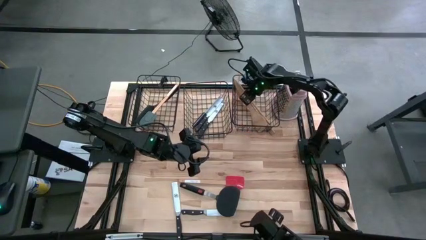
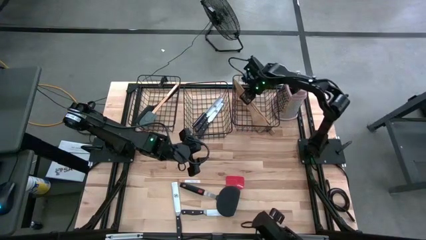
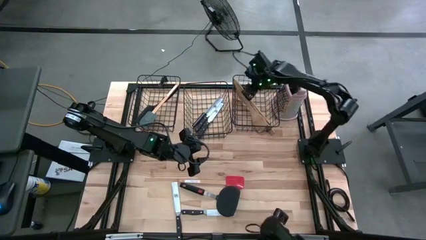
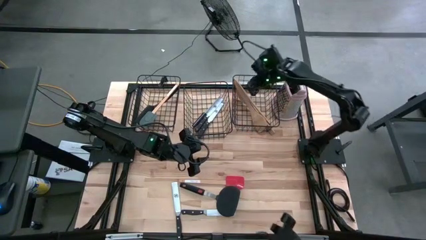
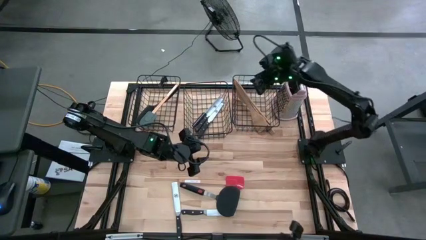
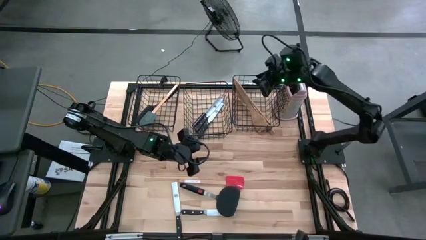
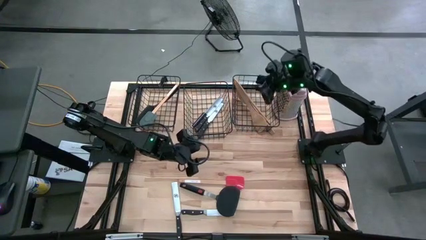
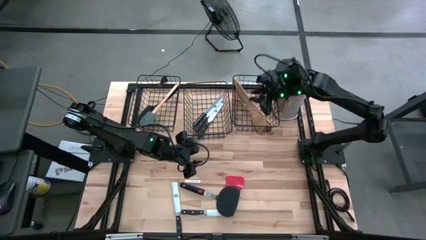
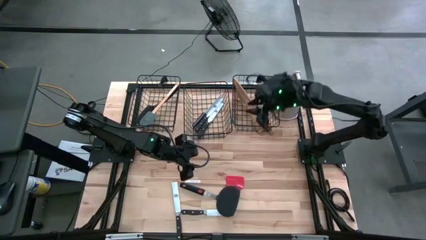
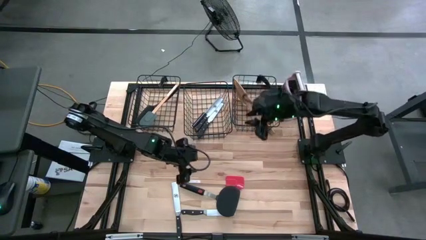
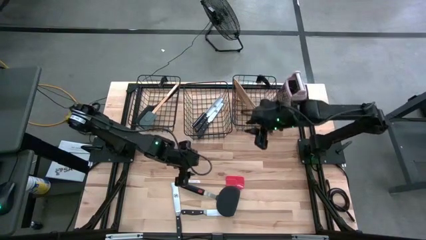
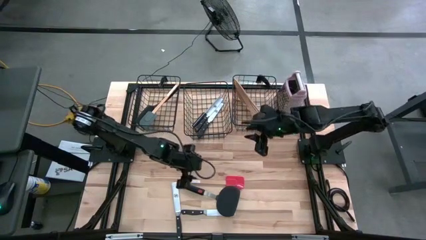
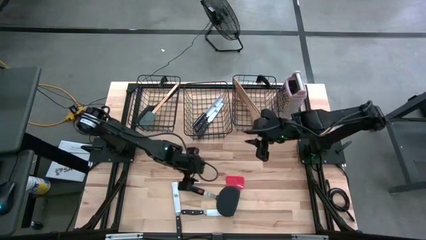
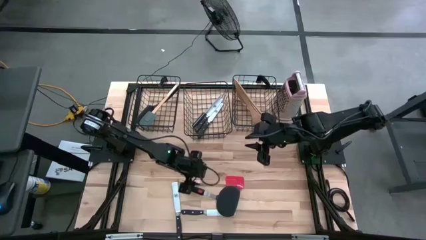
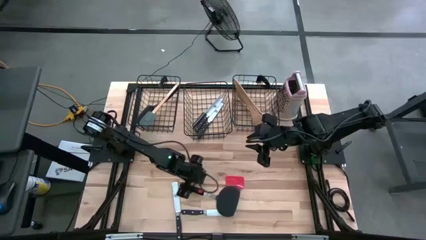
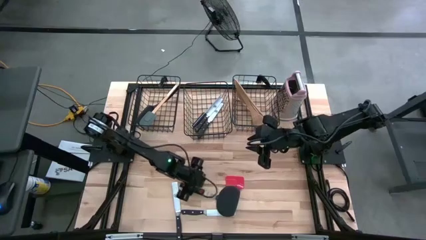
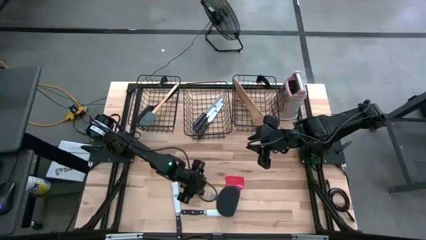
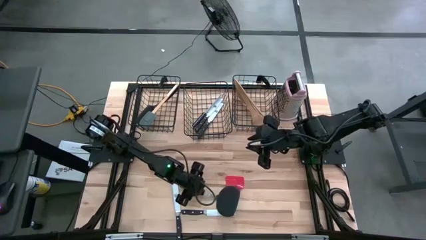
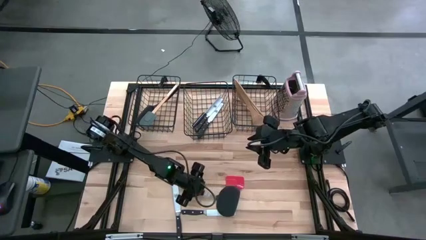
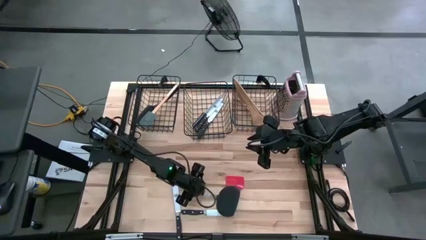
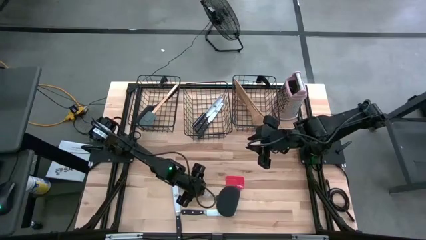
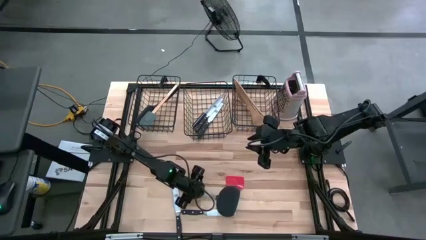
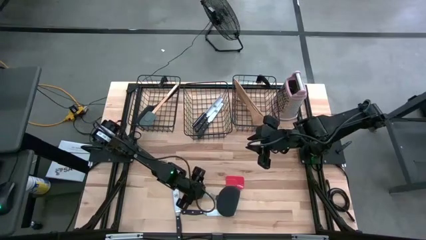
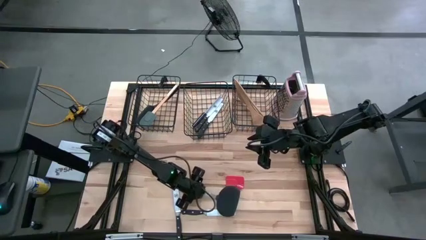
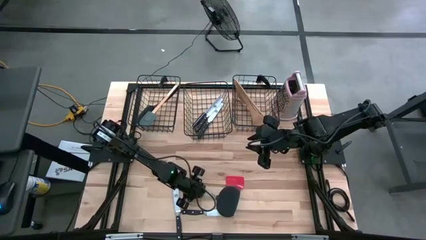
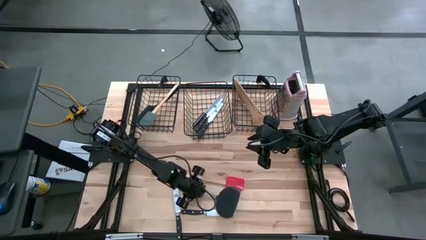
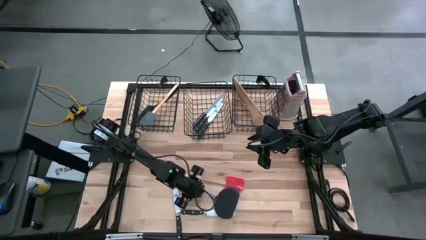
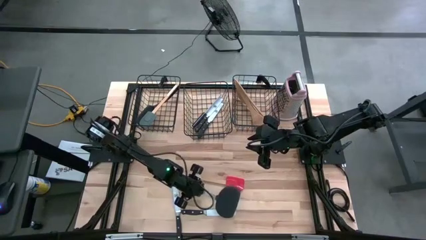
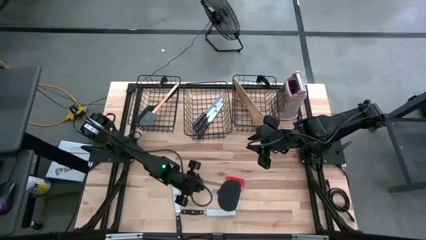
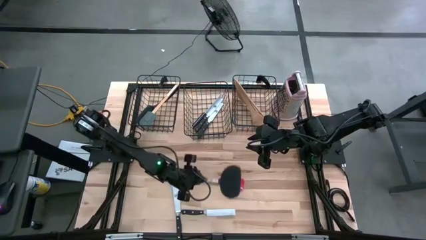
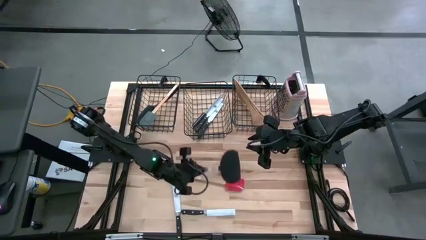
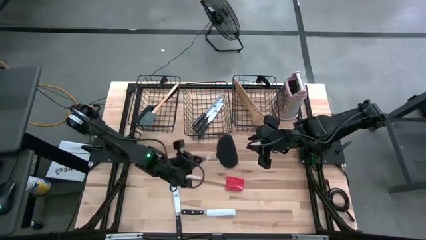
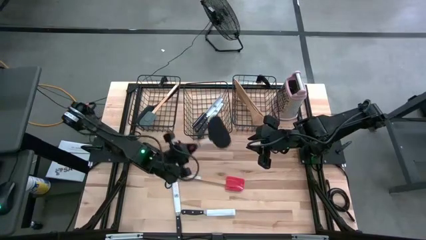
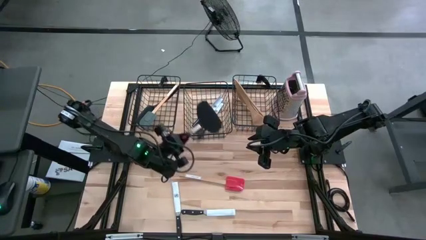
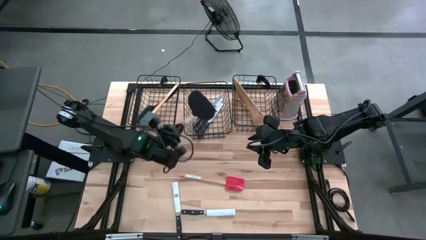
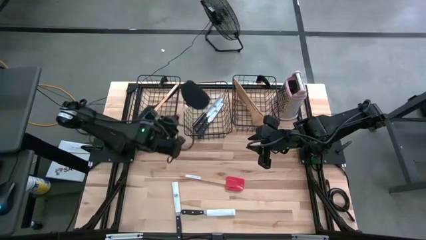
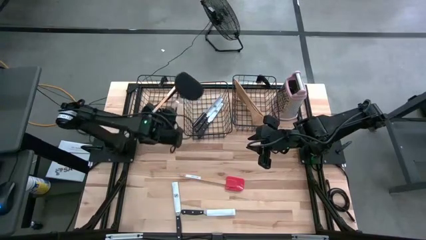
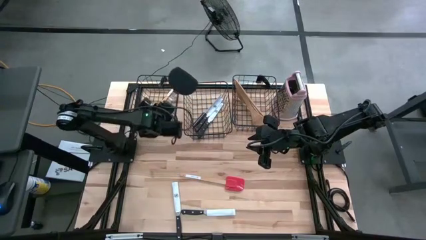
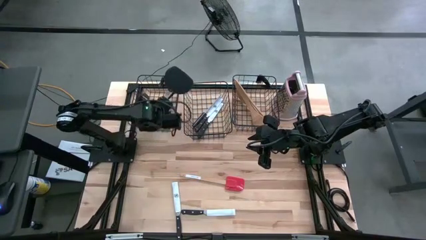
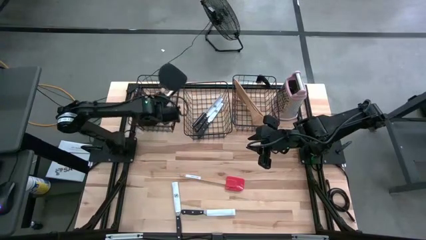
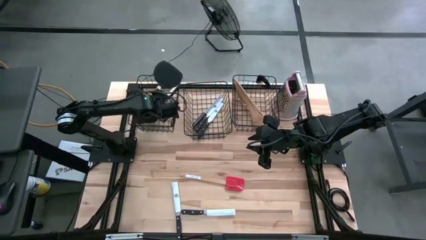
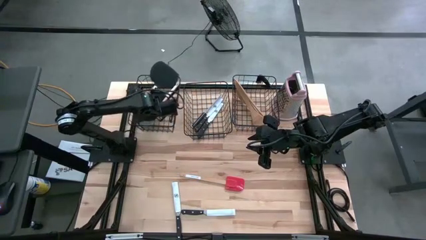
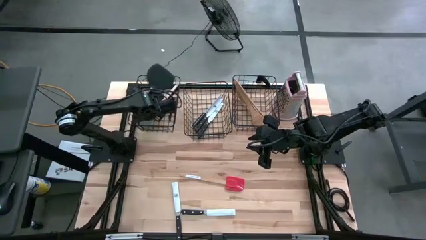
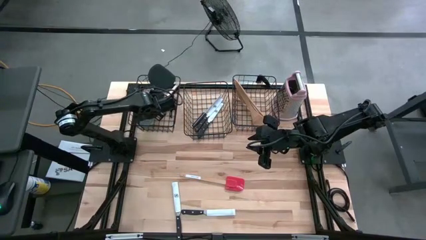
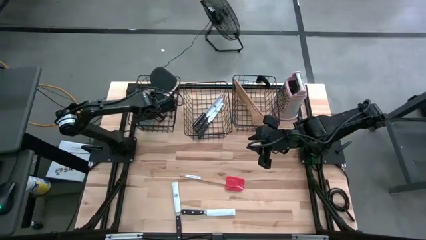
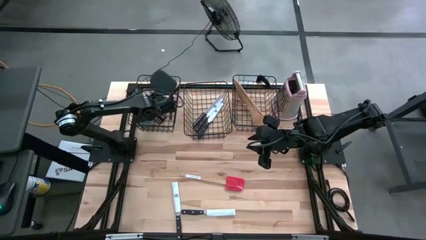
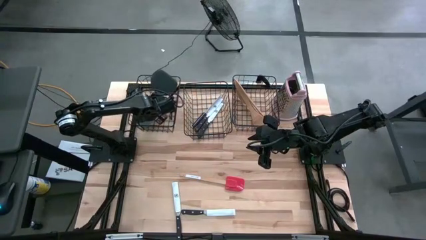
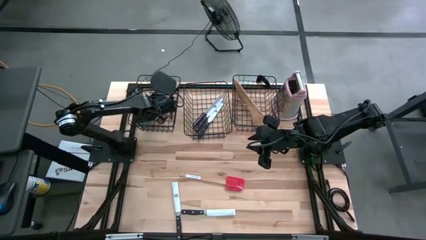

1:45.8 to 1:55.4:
Task: Pick & Place Kitchen Items
Put the black spatula into the left black wire basket

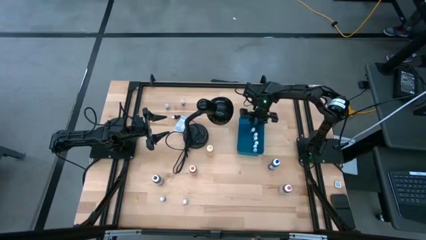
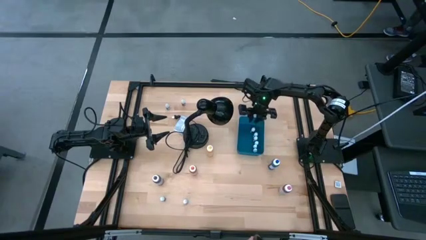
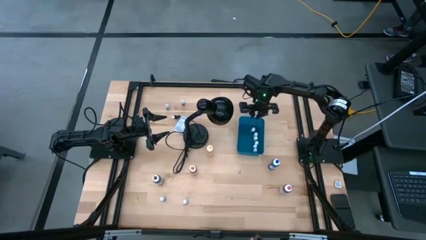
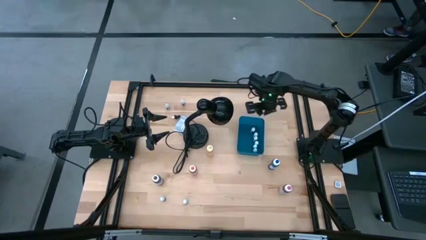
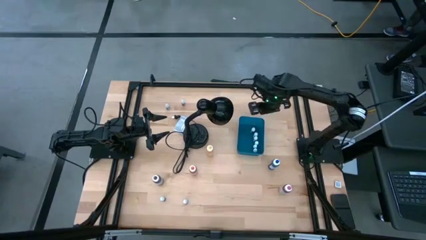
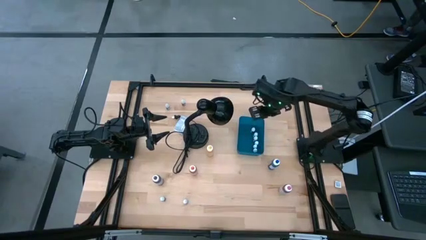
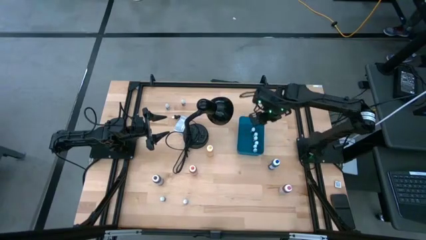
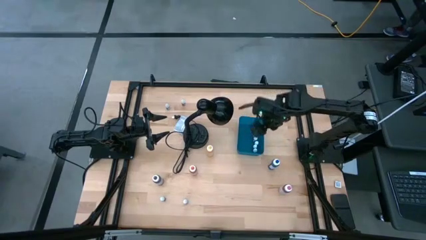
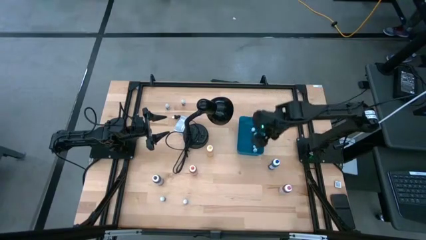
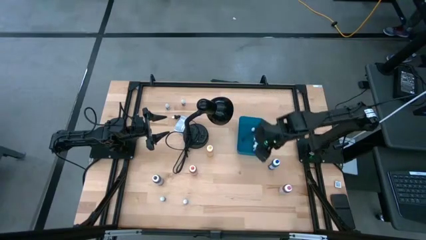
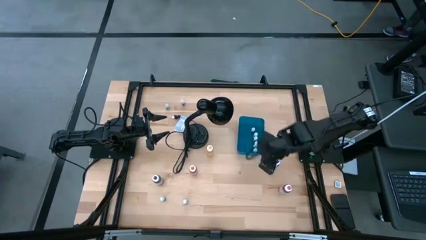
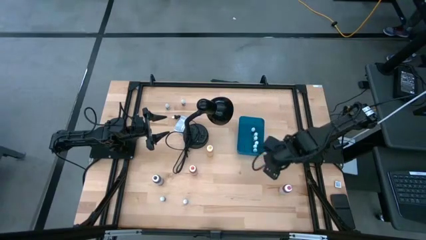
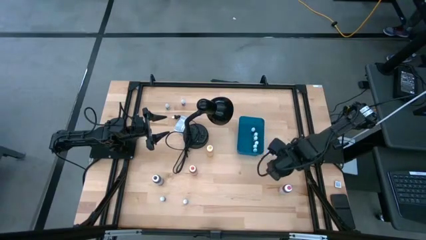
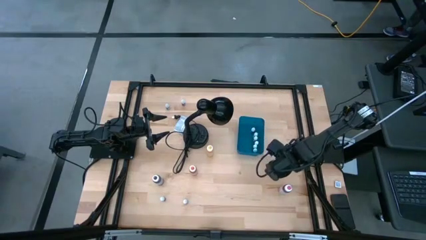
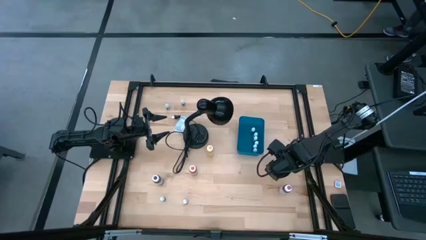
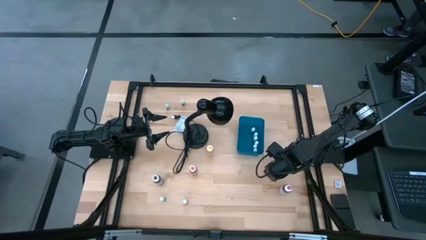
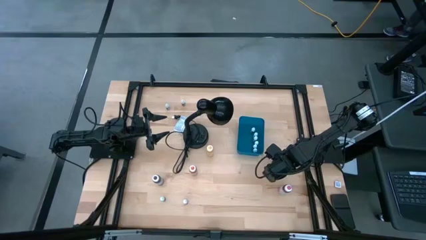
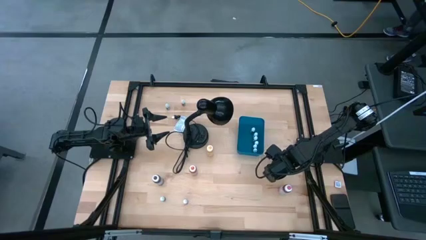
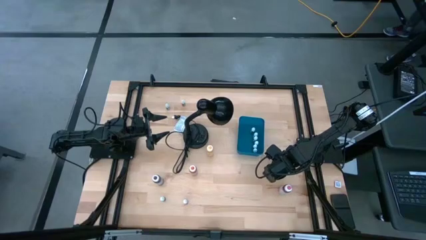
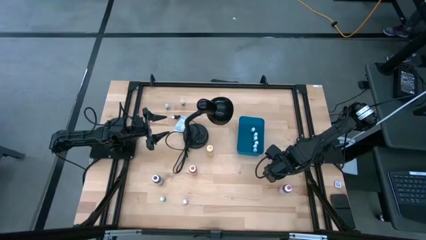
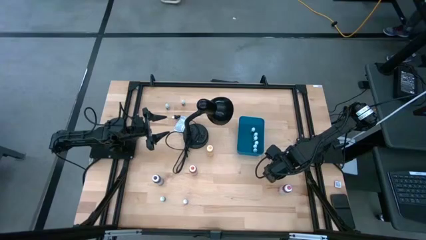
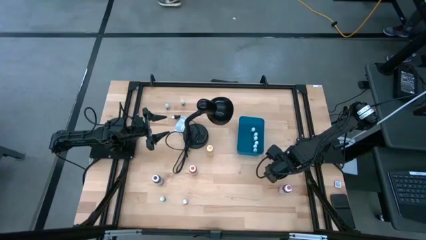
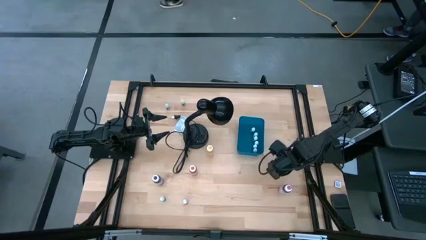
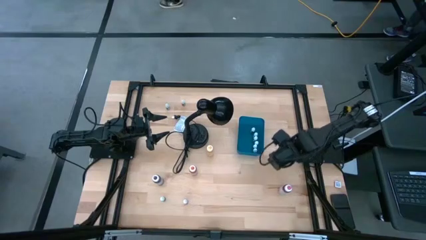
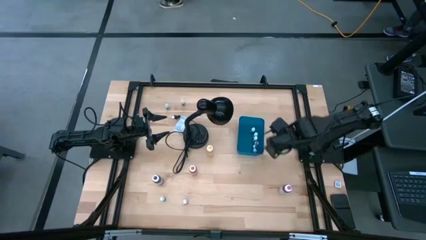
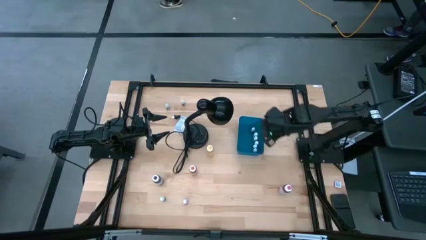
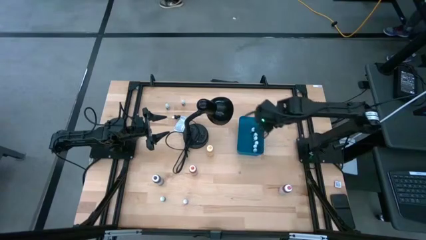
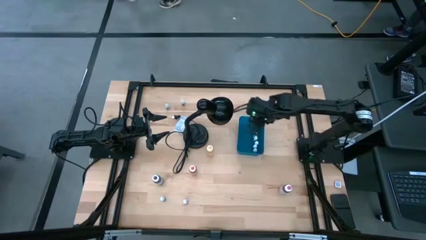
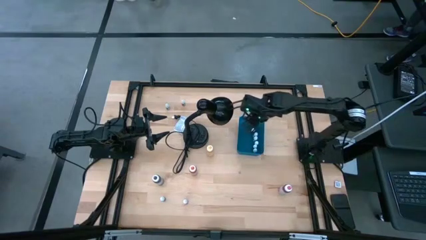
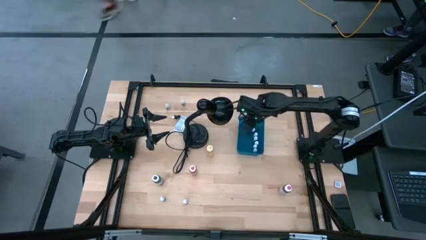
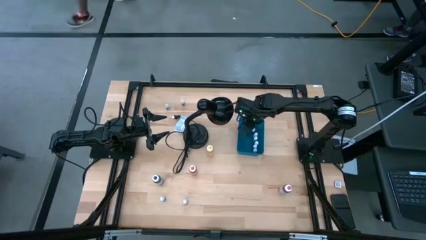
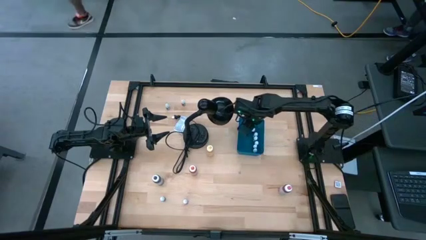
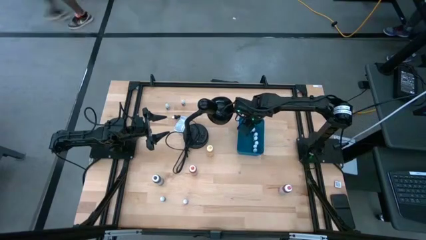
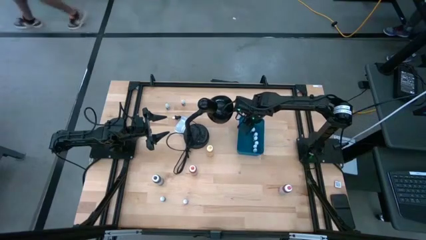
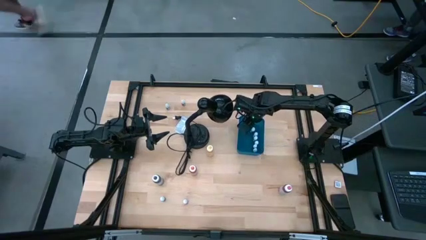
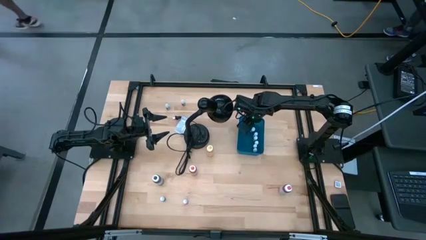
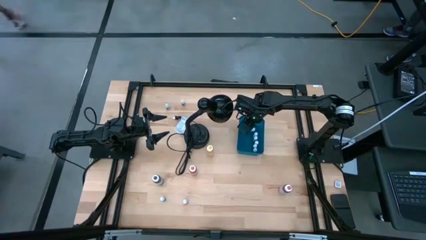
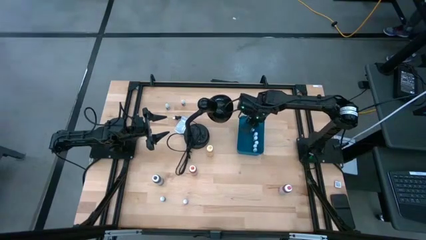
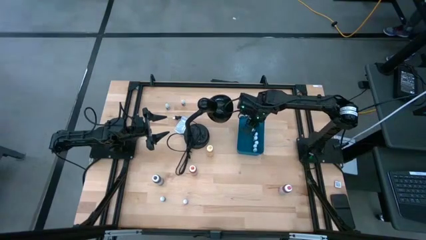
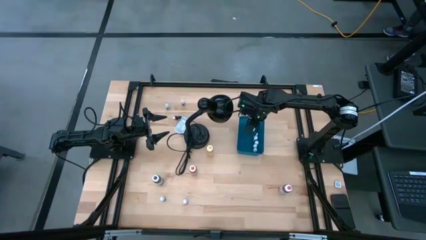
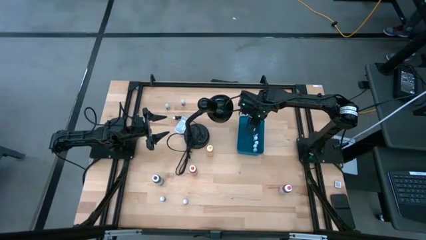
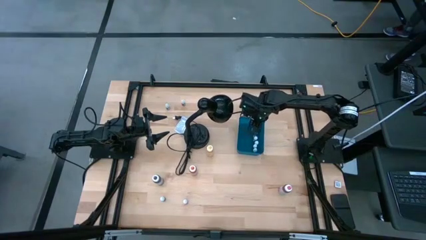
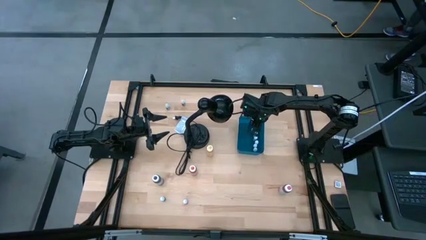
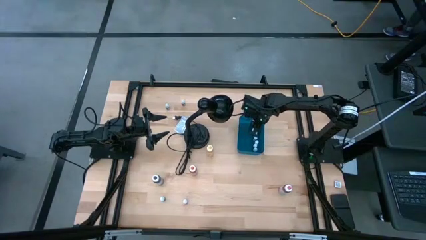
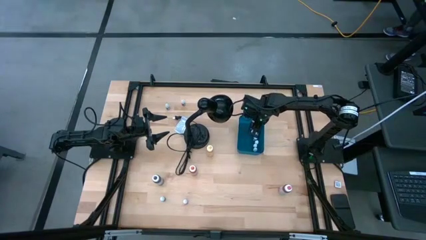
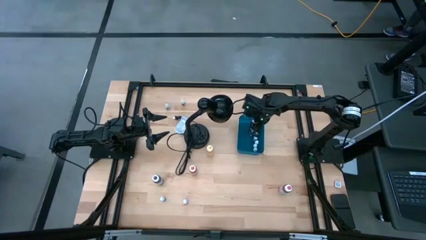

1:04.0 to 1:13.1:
Task: Pick & Place food coloring
Put the large blue food coloring bottle into the blue bin
